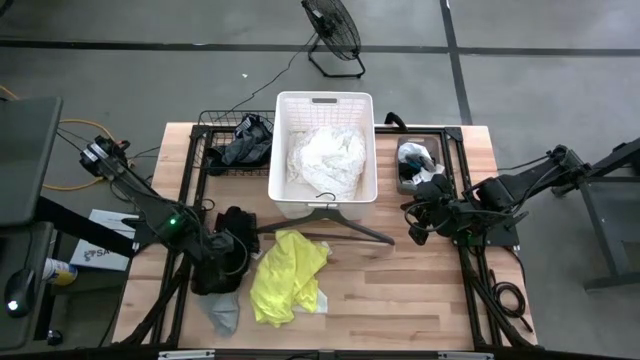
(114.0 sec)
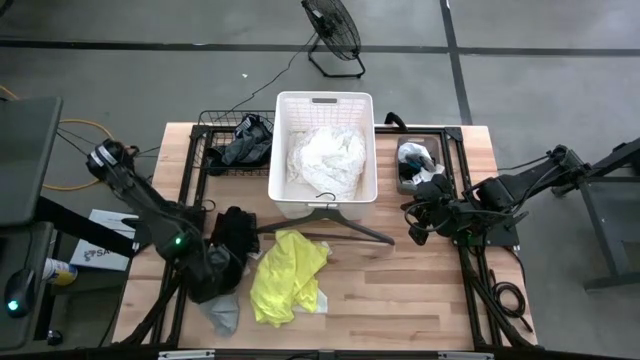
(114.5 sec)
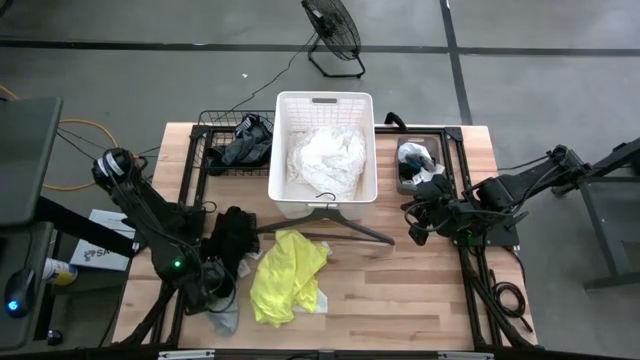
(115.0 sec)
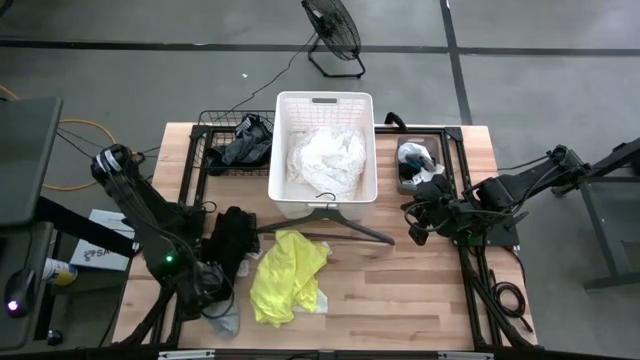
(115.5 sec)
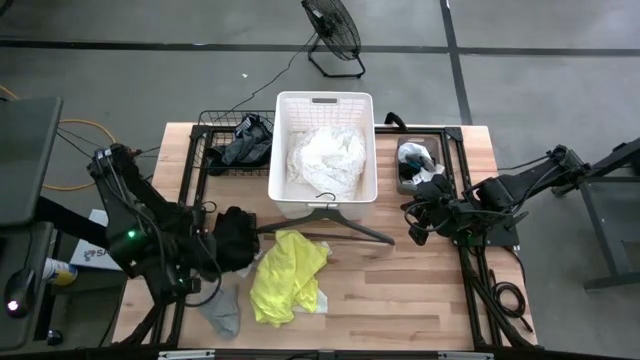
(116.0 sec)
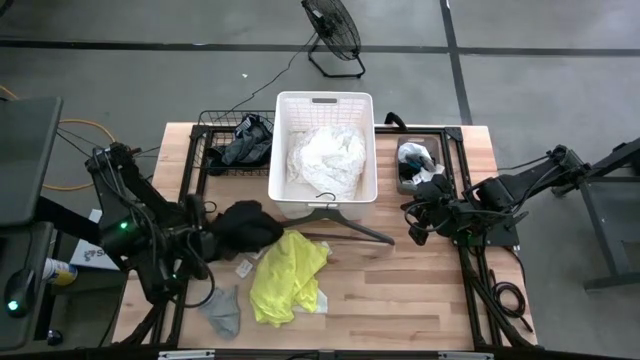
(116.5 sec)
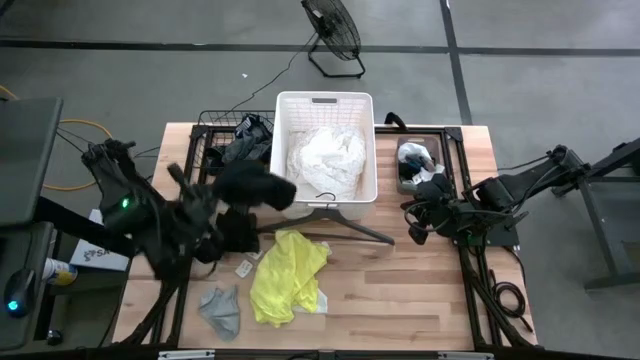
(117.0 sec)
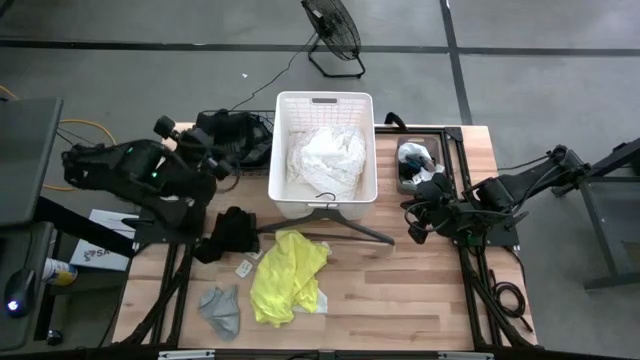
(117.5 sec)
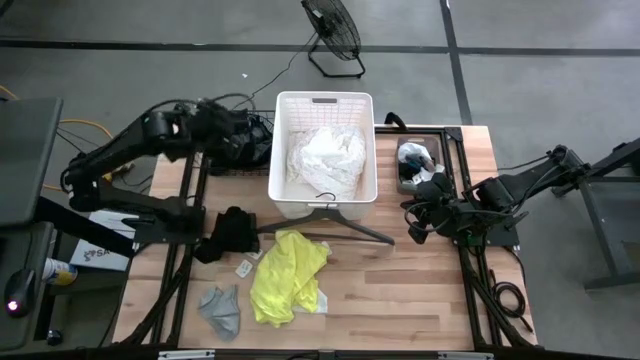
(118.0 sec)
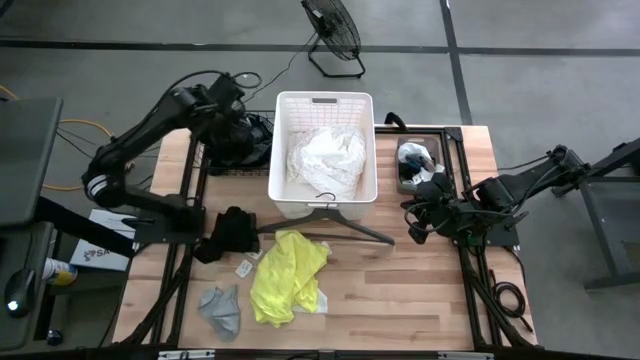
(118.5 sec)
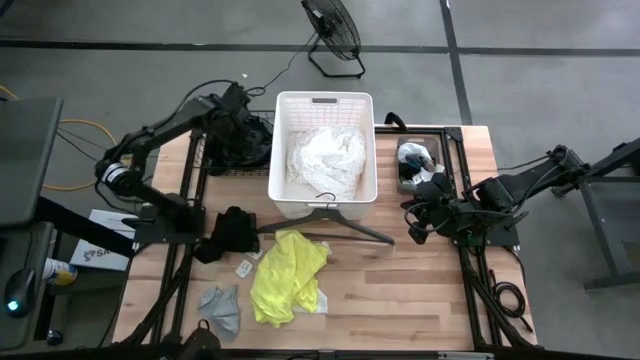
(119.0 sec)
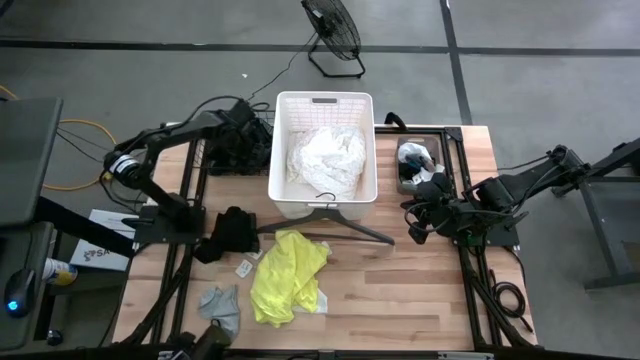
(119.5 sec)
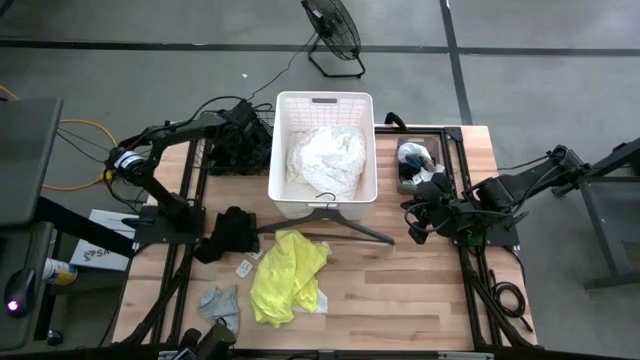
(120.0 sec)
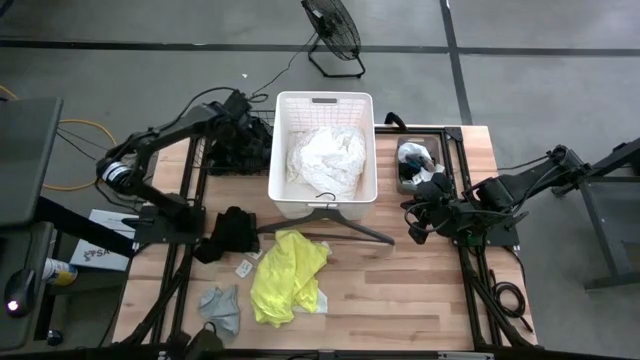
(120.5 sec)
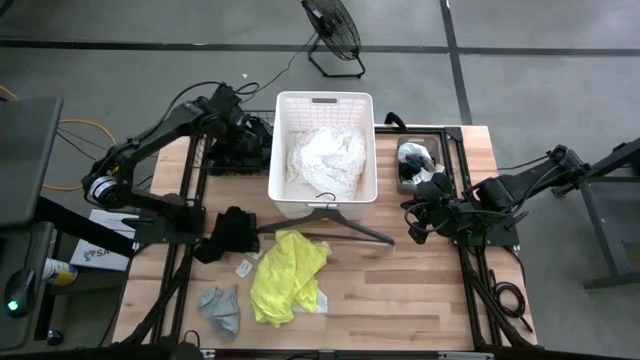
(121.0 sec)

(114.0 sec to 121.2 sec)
Task: Pick & Place Cloths
Put the bottom black underwear into the wire basket

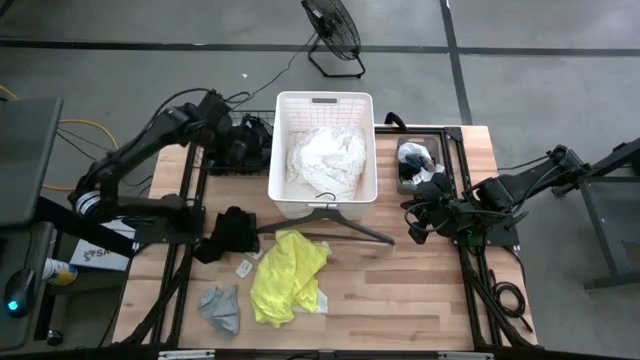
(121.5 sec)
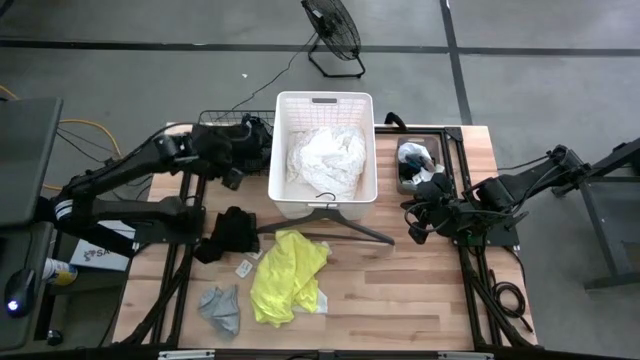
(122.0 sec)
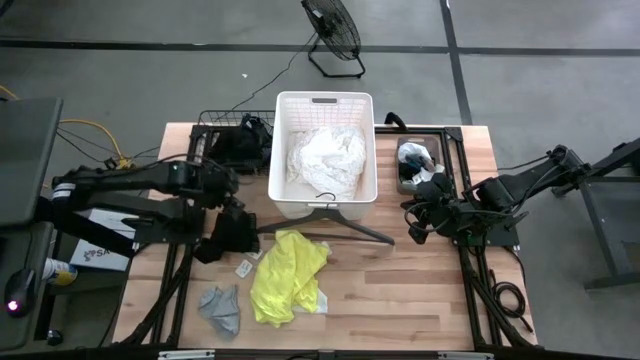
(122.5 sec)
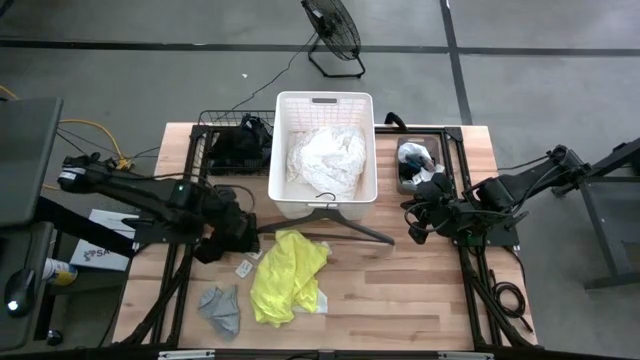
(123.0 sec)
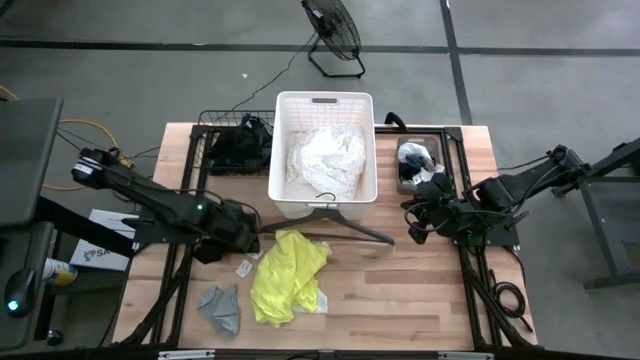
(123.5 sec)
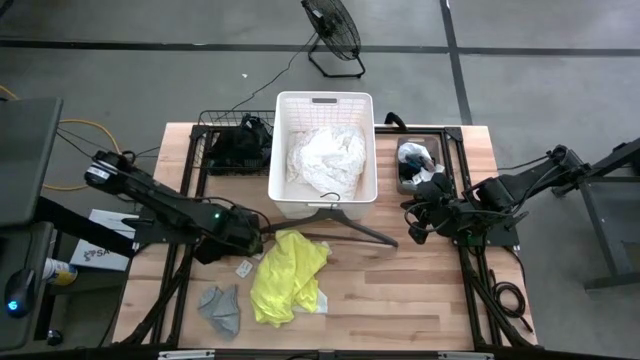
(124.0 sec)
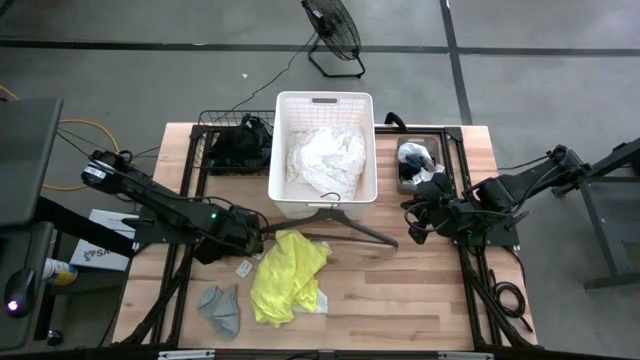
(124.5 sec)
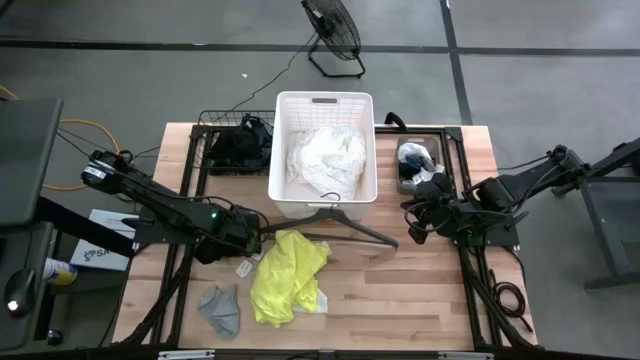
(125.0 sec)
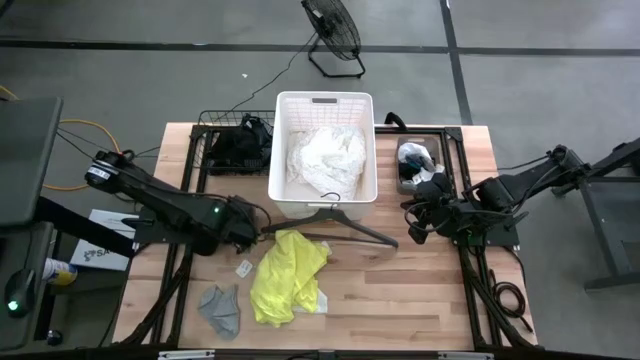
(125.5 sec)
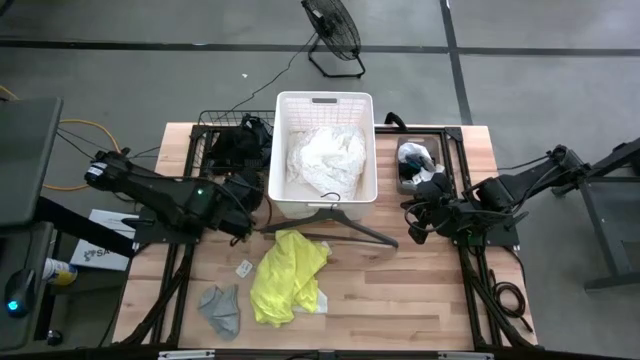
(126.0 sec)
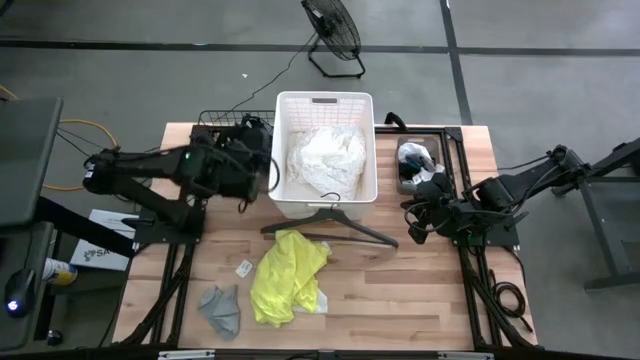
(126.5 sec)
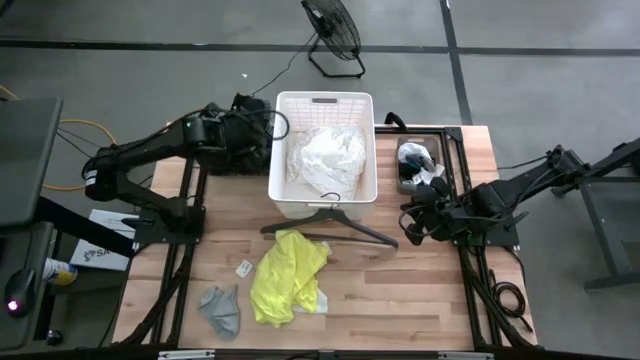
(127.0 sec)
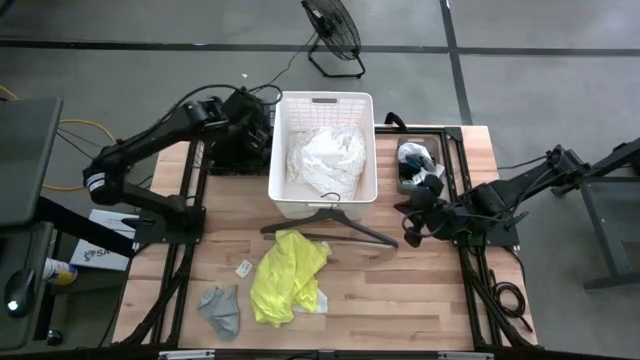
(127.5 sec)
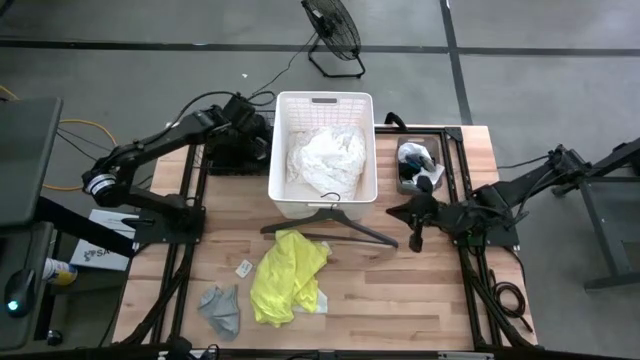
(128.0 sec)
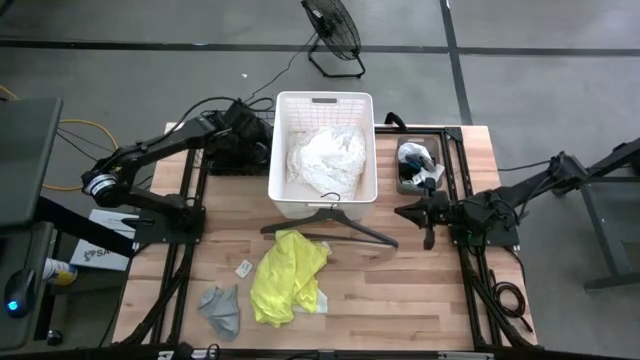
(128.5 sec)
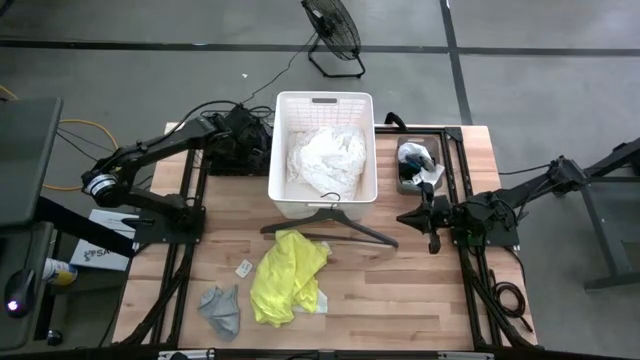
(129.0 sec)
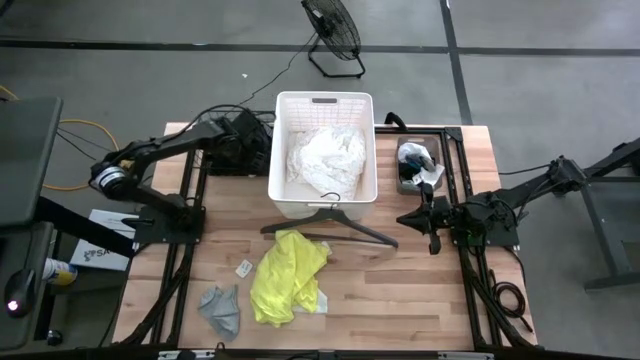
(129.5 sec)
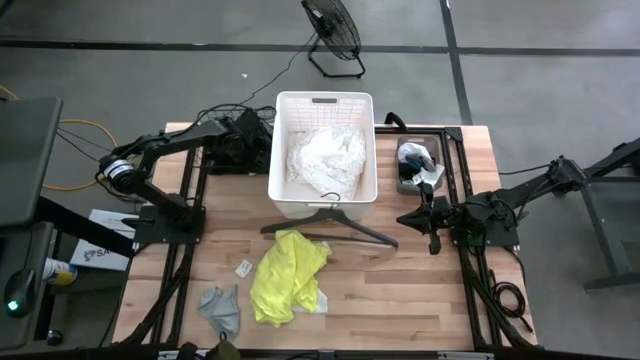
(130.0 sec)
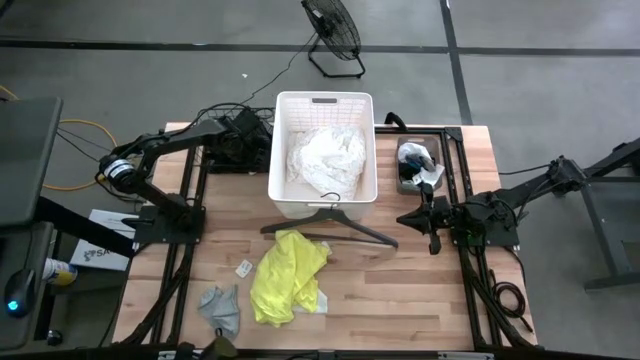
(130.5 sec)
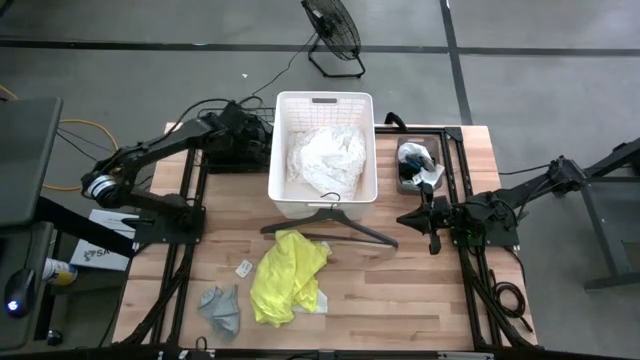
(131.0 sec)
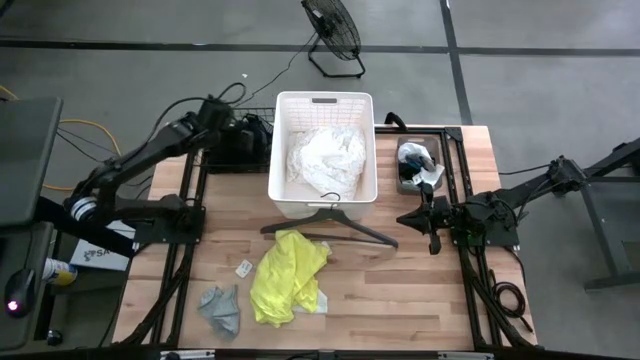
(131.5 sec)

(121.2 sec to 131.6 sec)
Put the black underwear into the wire basket

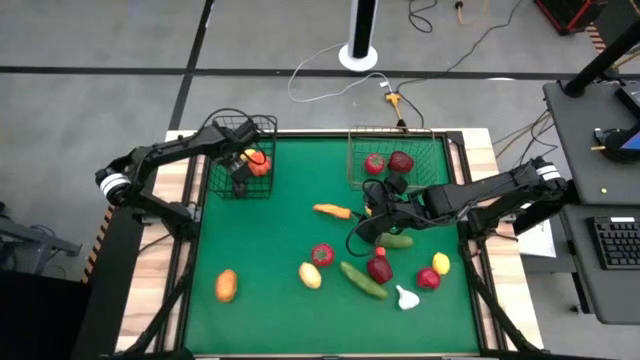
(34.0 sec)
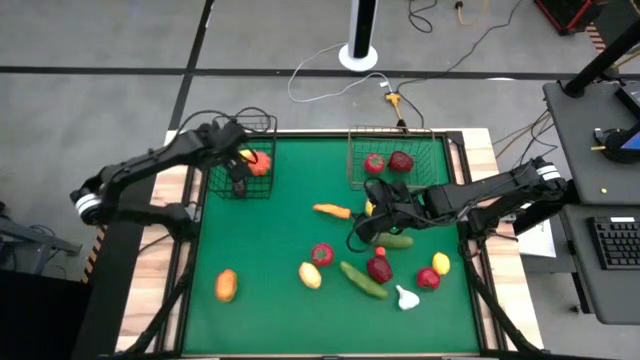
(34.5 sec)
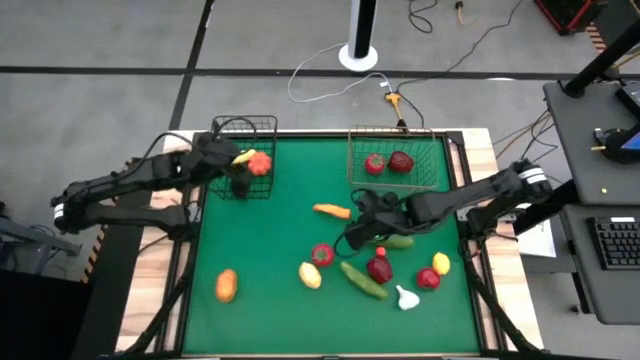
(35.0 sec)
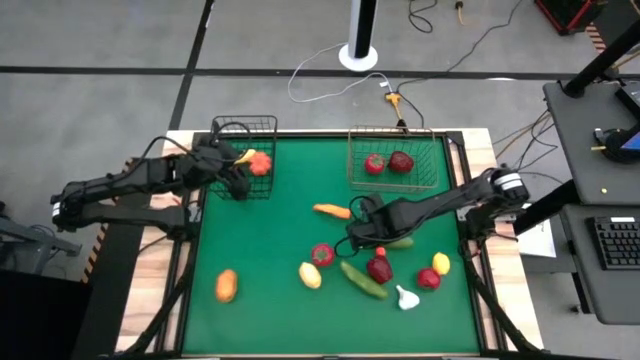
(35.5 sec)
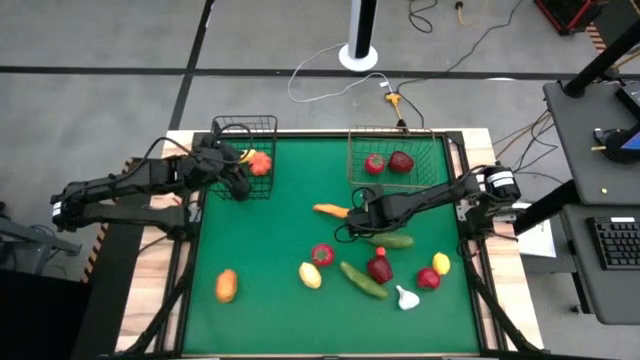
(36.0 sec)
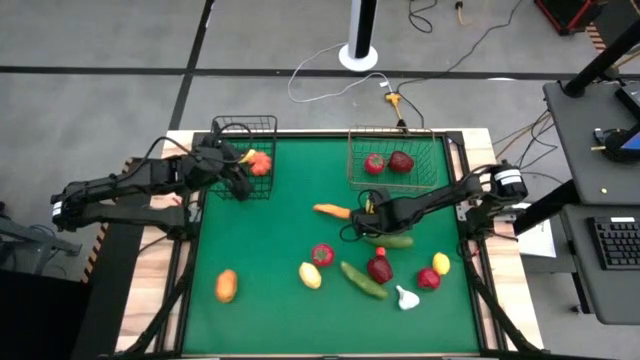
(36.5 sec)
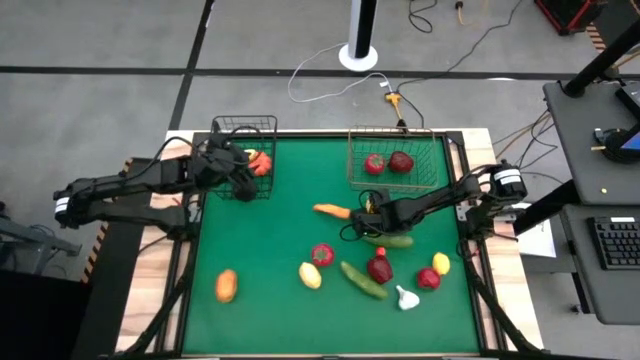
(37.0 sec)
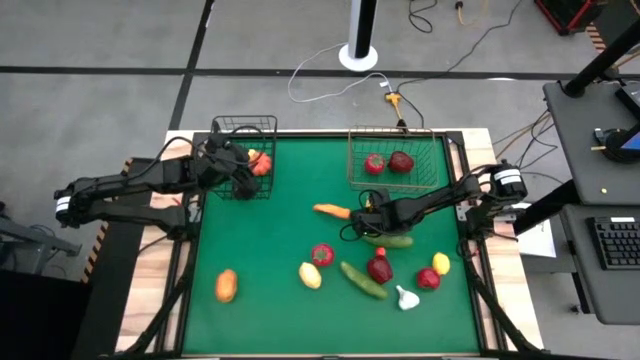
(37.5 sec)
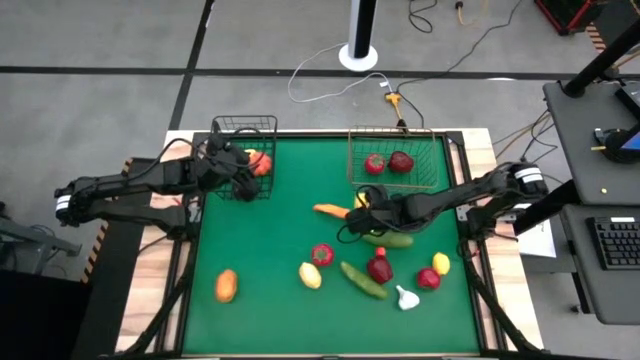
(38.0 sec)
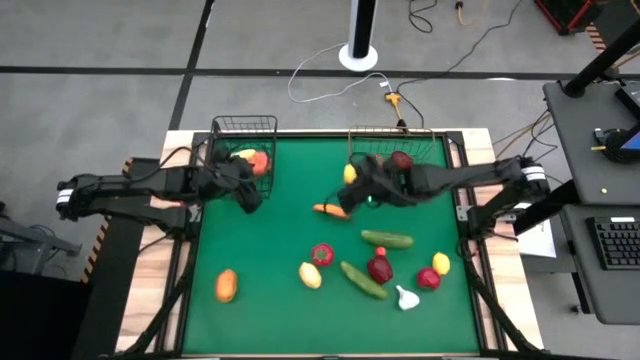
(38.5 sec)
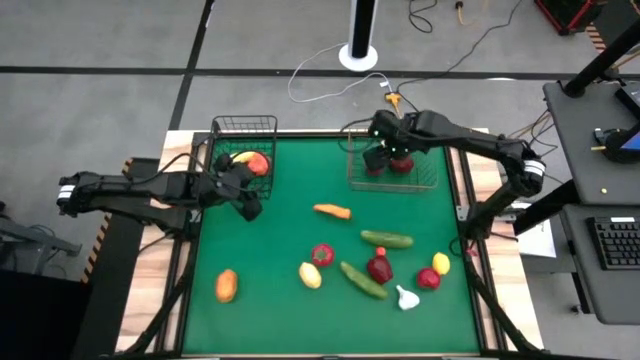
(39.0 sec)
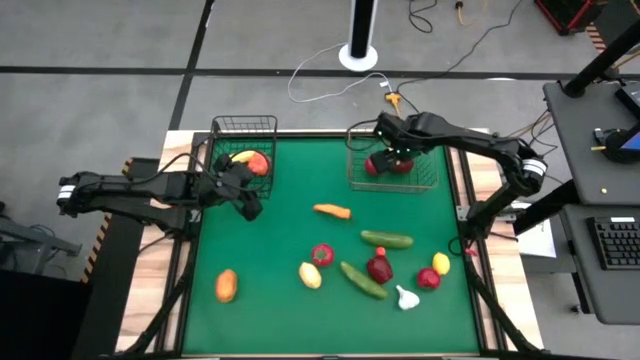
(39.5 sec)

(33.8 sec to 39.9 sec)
Task: Sort produce into baskets
Put the top yellow lemon into the right wire basket
